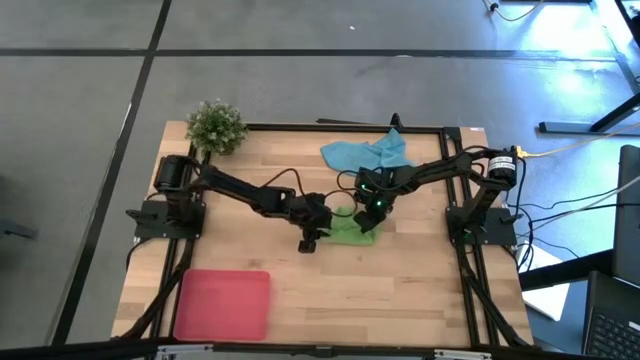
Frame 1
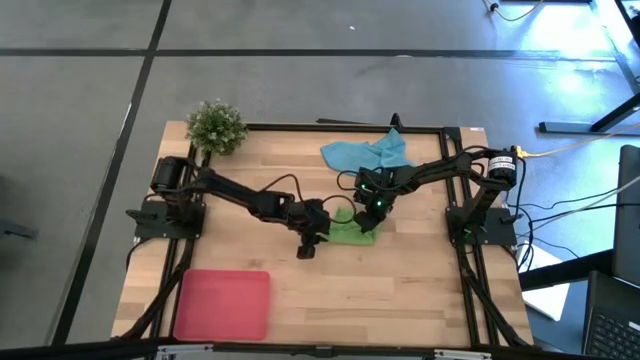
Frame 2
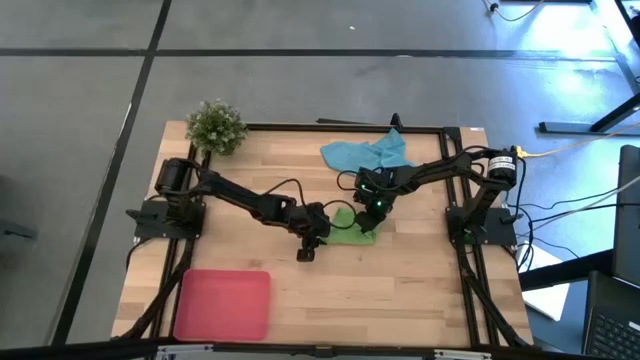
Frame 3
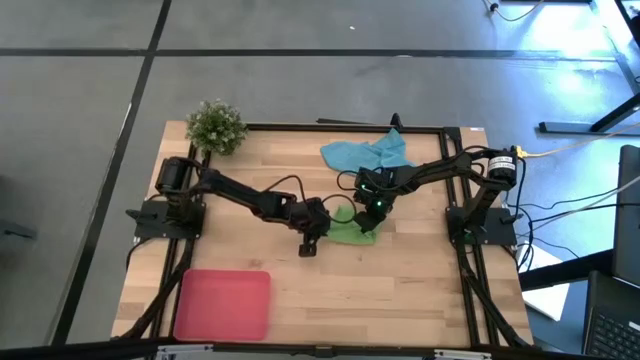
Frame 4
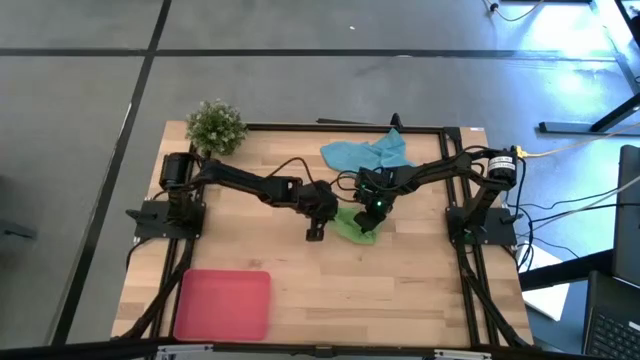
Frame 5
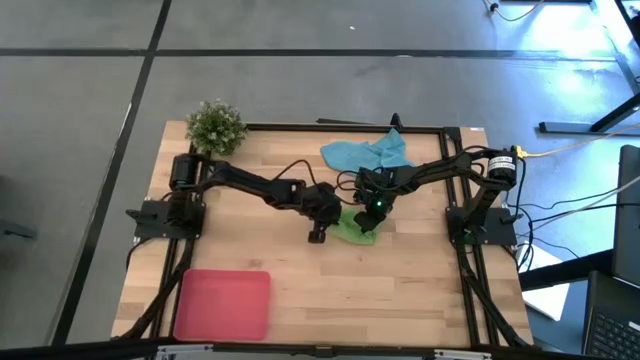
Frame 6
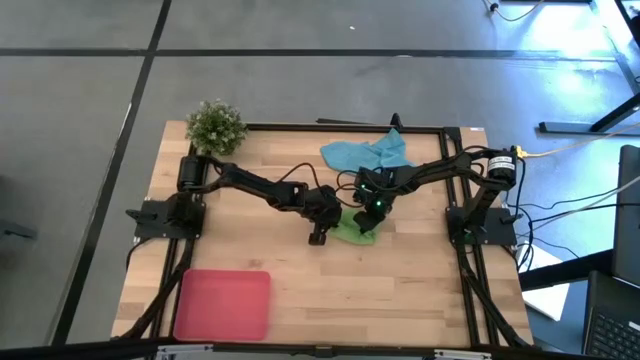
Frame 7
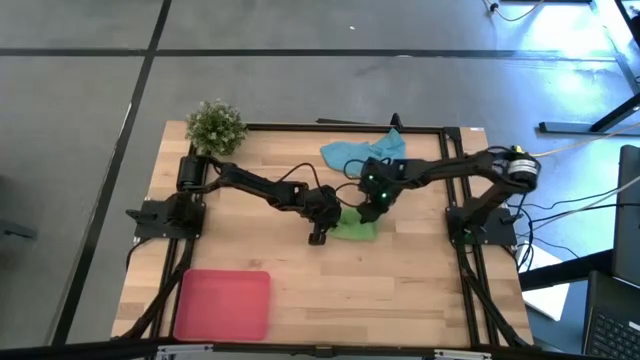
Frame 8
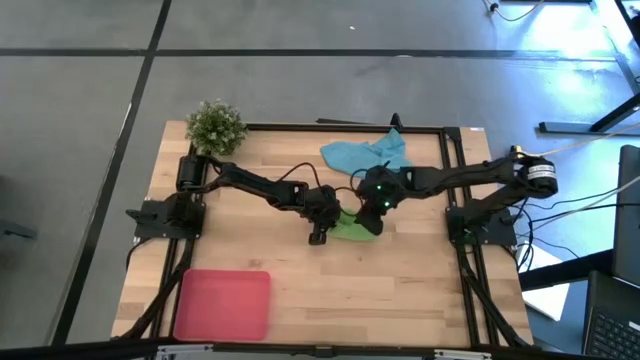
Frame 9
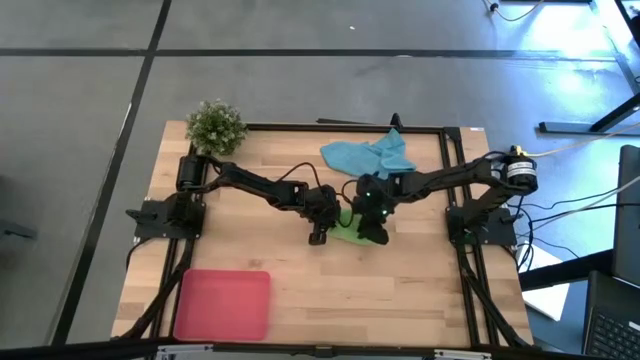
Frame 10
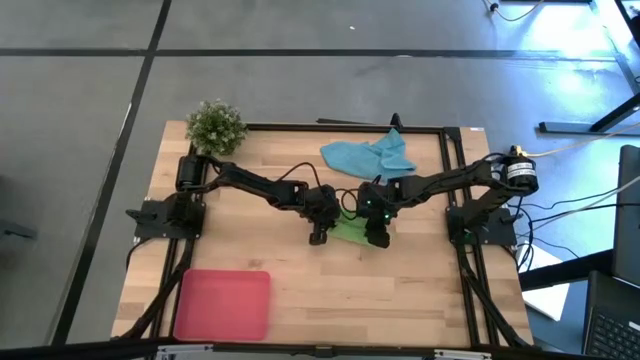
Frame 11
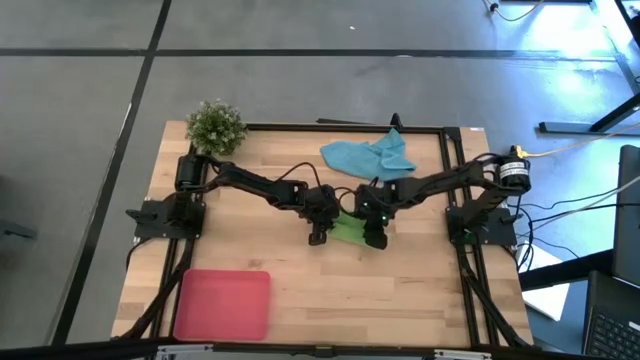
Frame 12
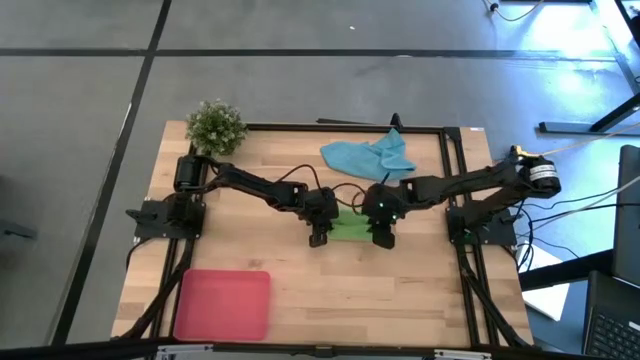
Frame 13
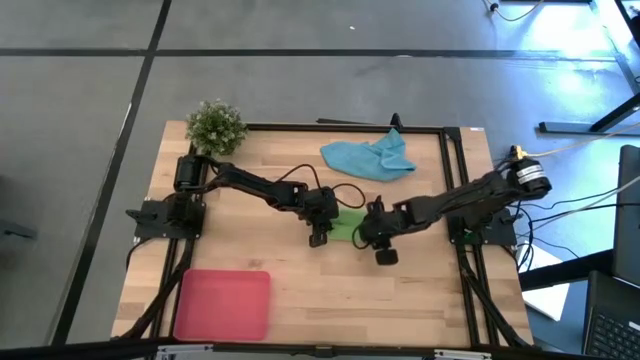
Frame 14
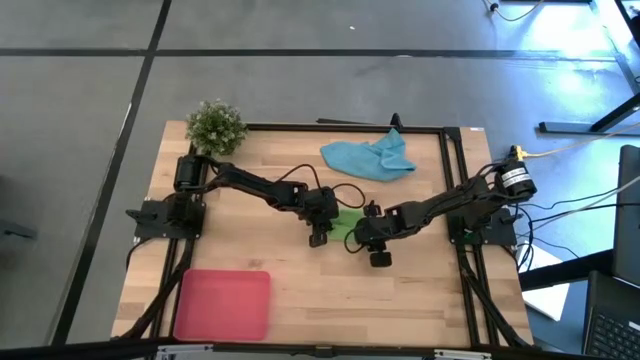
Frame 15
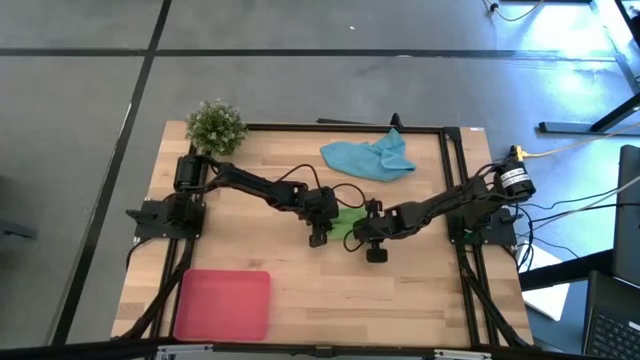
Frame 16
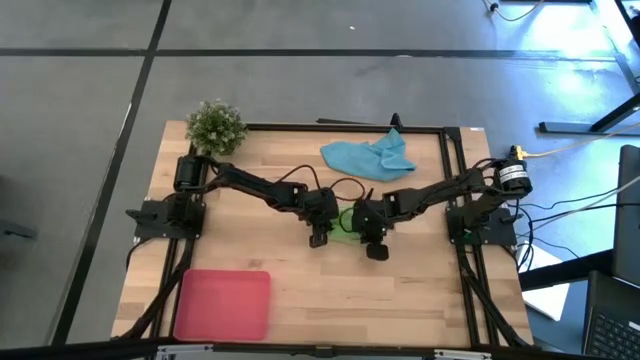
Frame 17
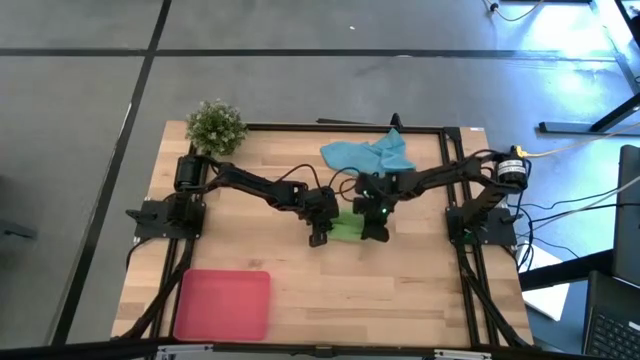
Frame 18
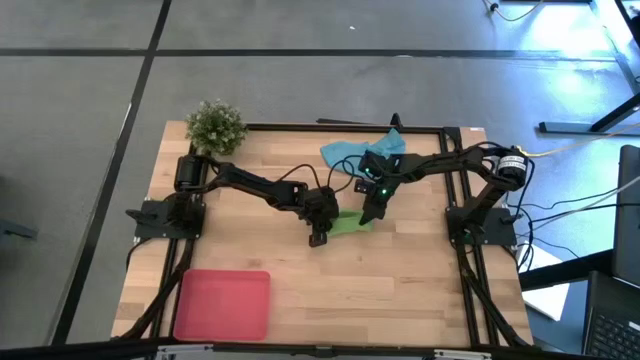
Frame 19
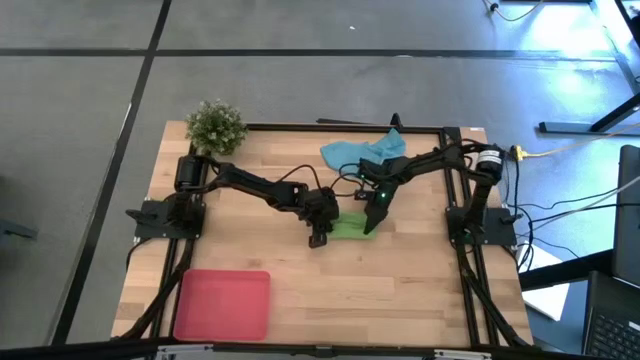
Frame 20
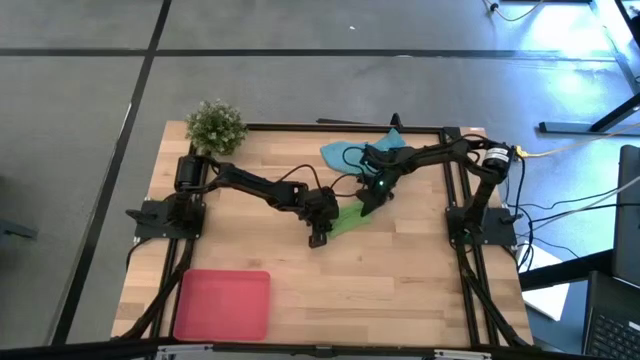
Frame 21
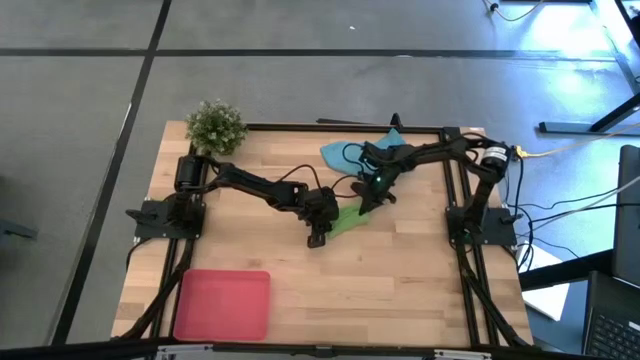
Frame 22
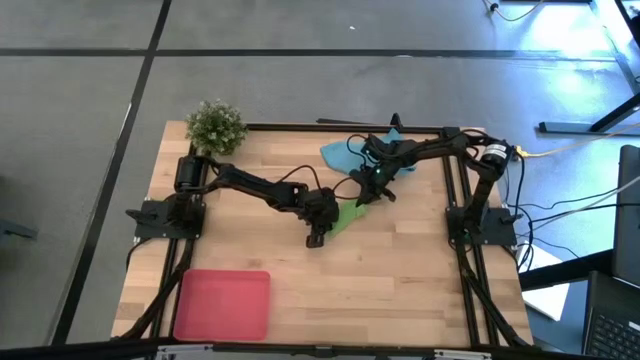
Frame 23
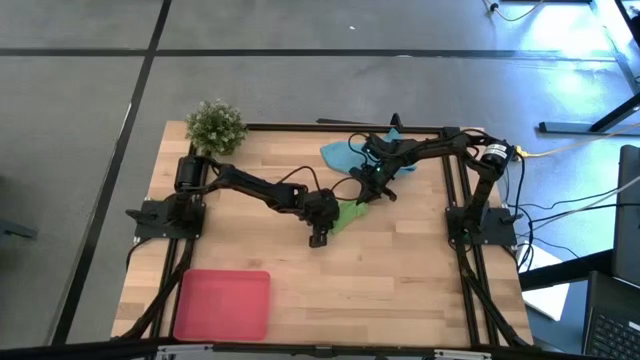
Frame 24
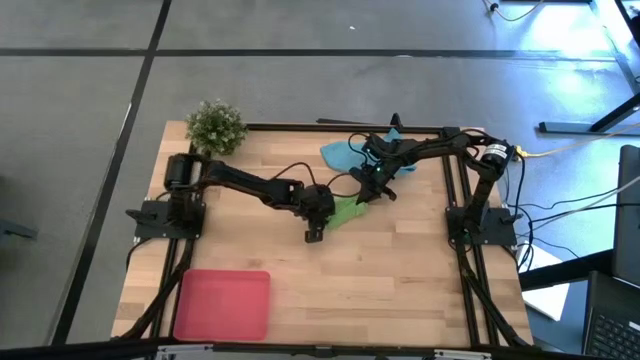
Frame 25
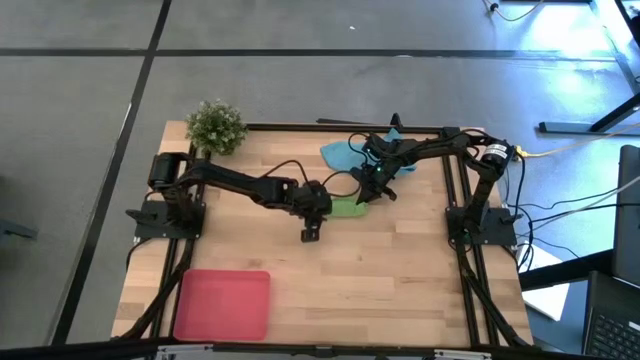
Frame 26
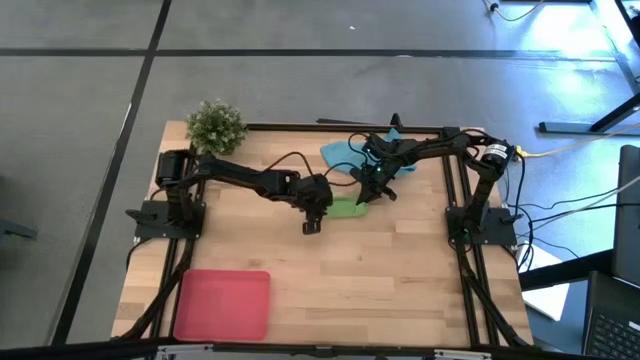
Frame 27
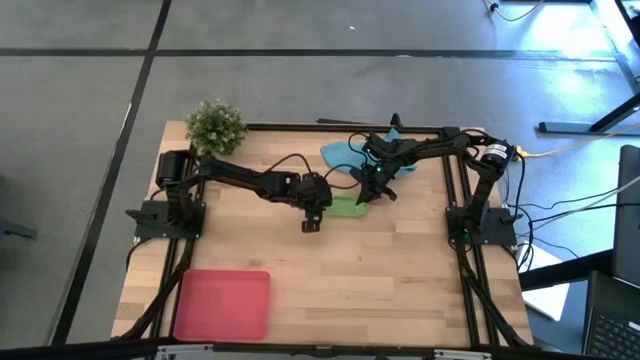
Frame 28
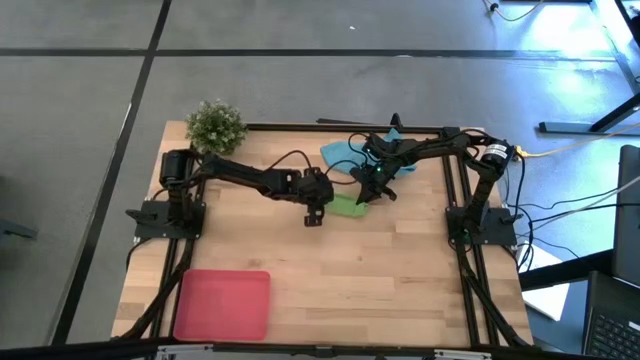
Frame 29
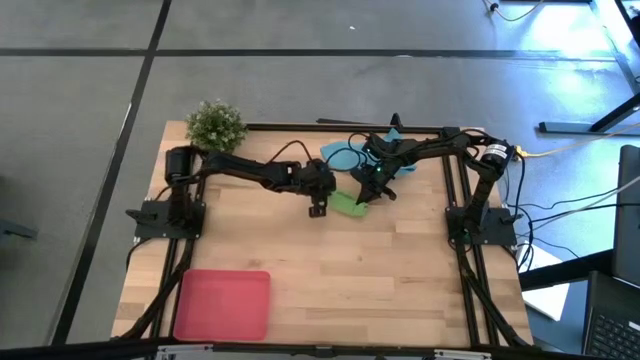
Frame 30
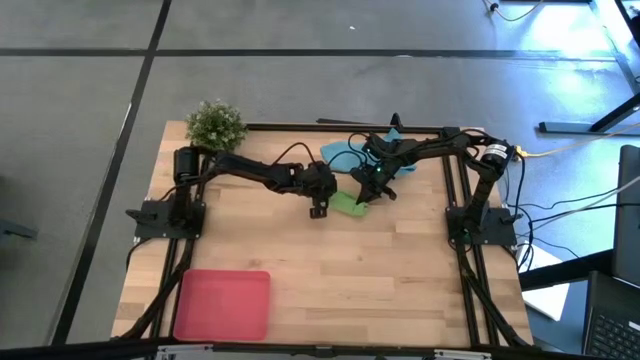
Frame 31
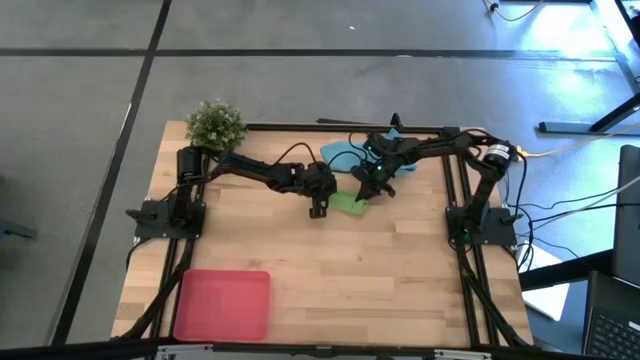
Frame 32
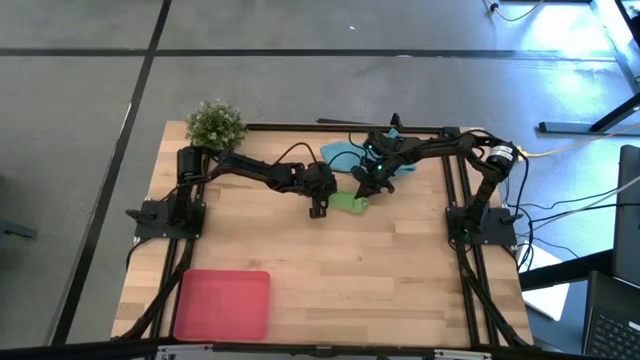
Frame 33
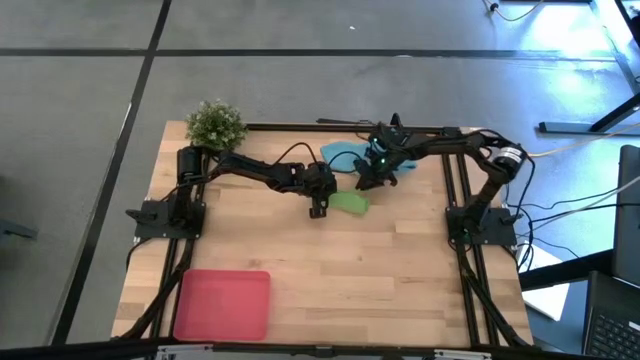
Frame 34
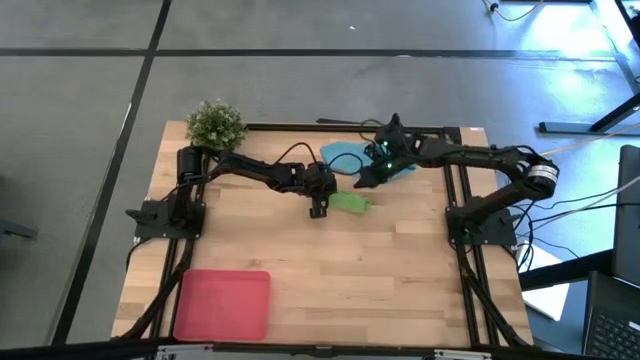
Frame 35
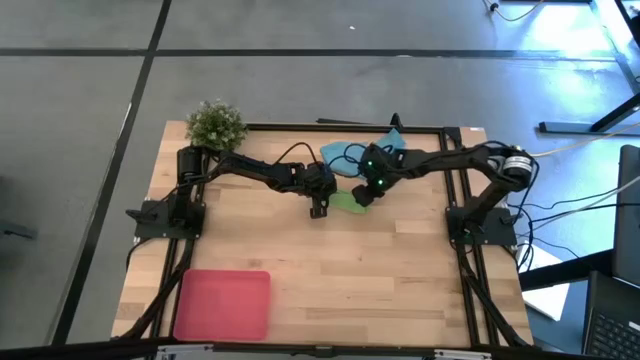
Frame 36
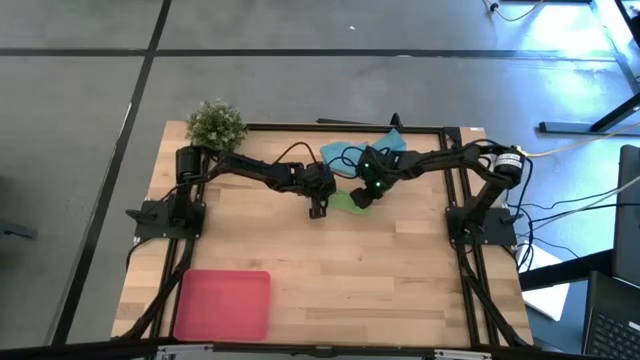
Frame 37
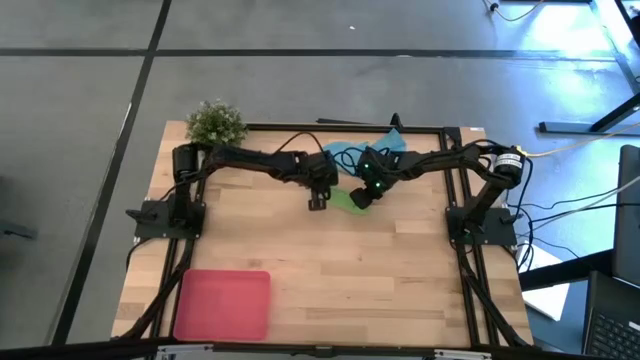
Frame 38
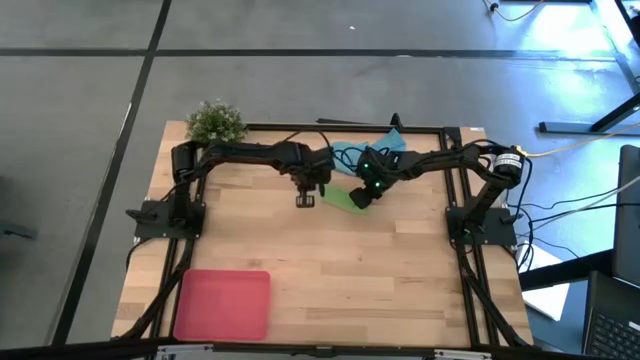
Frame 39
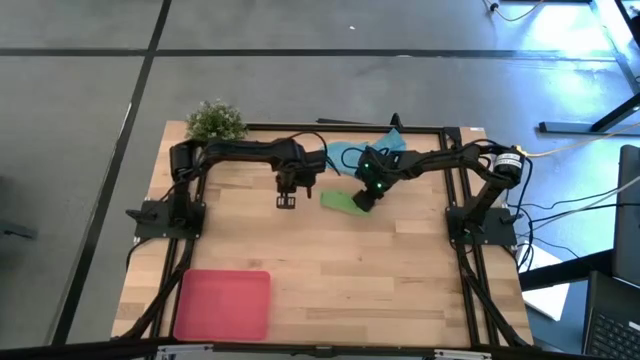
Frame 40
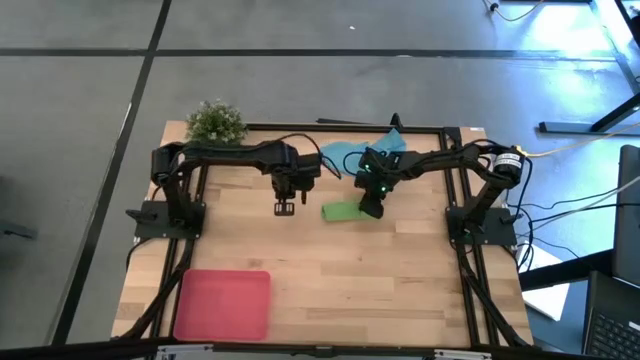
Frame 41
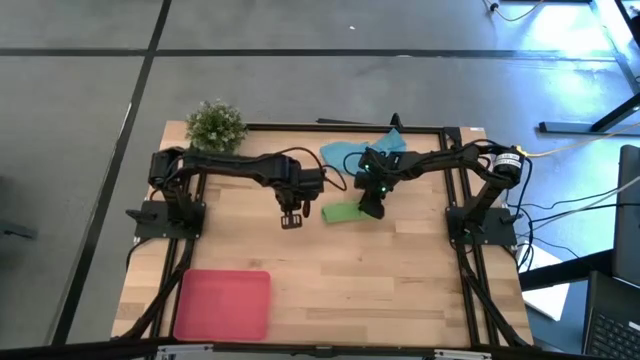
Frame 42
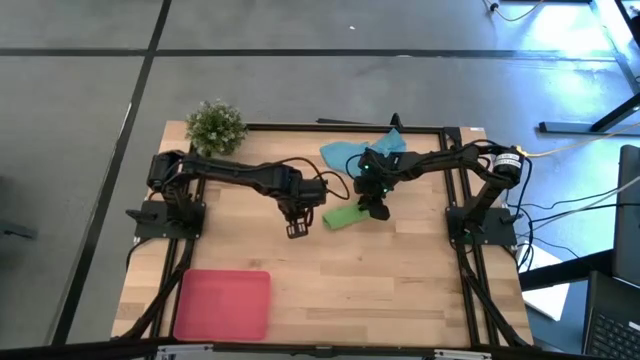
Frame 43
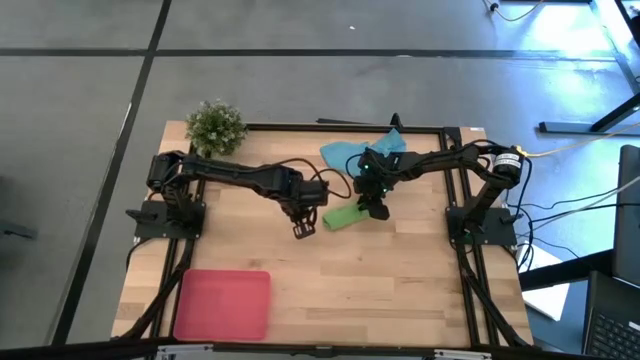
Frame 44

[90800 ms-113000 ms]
Task: Roll microfiber towels into tight, uniform cylinder then place into a basket
Roll the microfiber green towel
